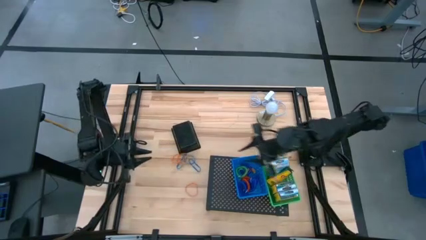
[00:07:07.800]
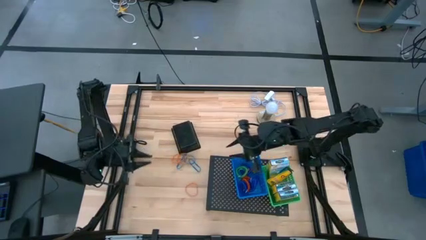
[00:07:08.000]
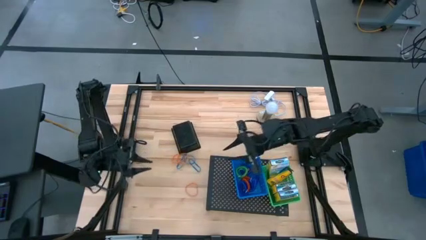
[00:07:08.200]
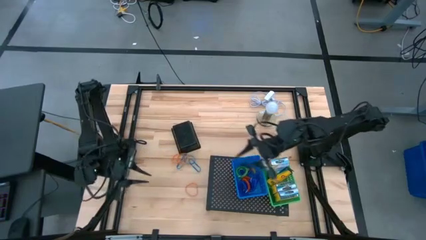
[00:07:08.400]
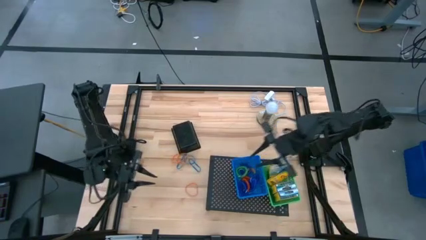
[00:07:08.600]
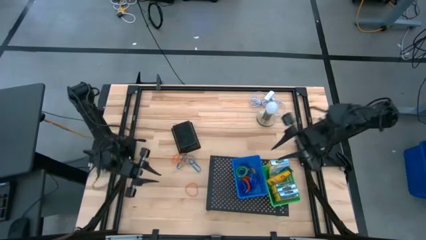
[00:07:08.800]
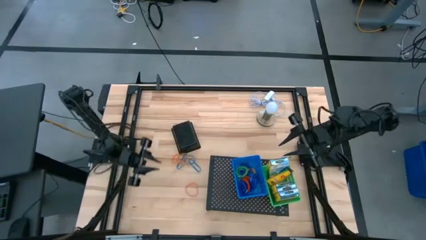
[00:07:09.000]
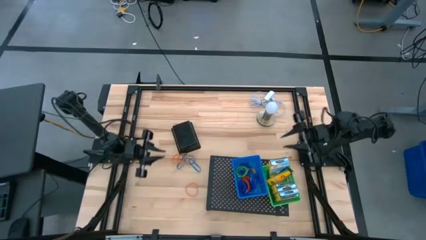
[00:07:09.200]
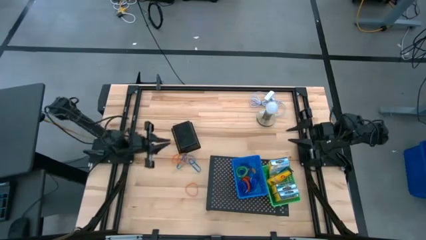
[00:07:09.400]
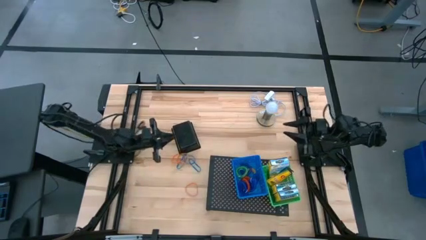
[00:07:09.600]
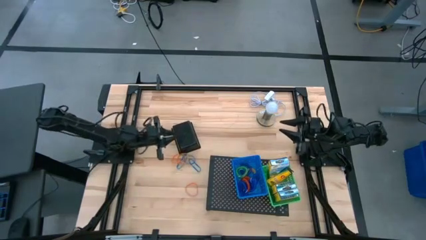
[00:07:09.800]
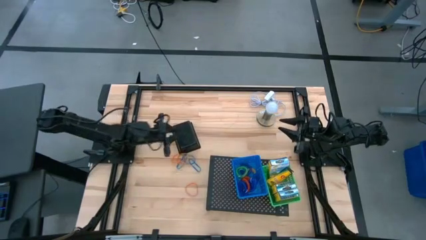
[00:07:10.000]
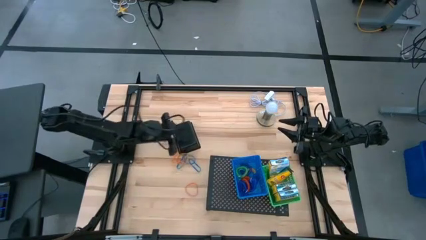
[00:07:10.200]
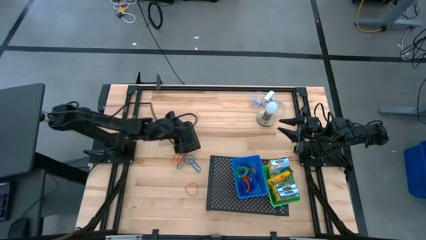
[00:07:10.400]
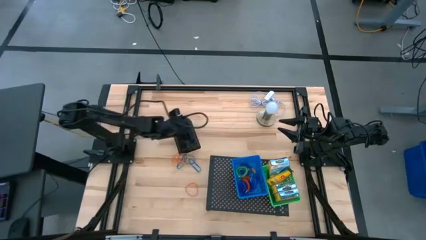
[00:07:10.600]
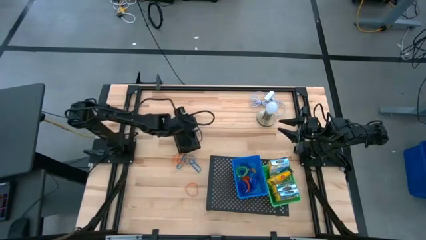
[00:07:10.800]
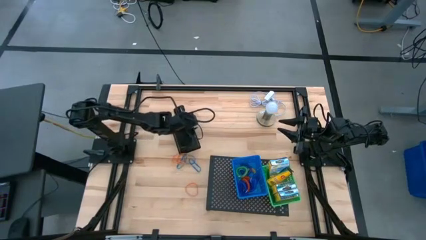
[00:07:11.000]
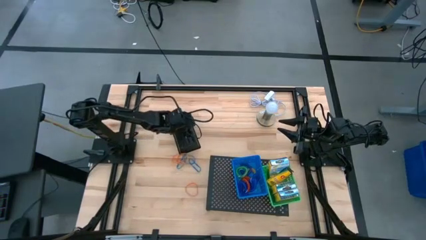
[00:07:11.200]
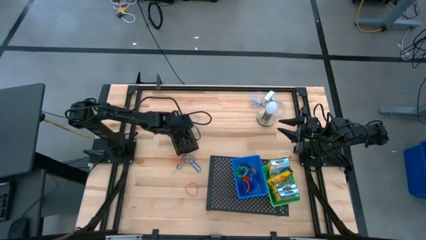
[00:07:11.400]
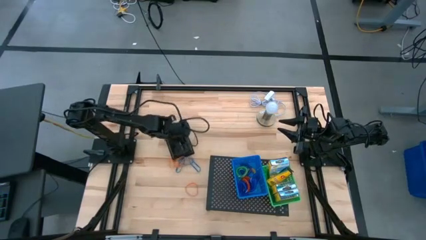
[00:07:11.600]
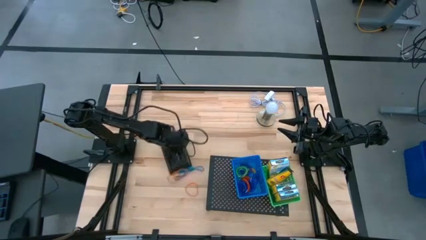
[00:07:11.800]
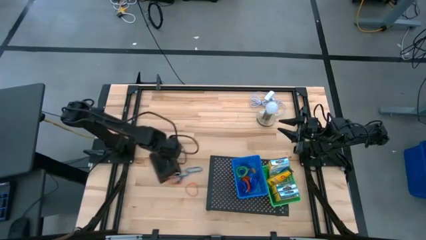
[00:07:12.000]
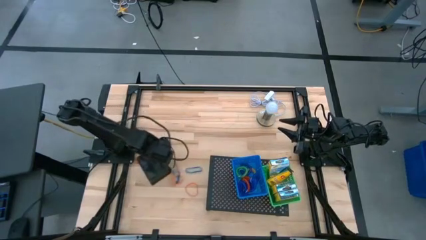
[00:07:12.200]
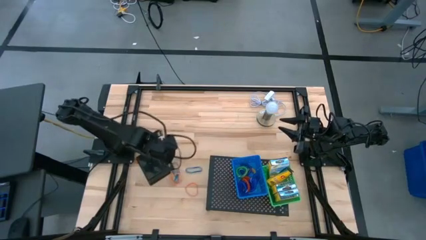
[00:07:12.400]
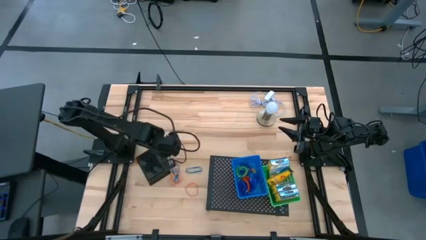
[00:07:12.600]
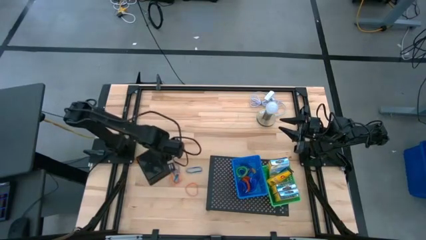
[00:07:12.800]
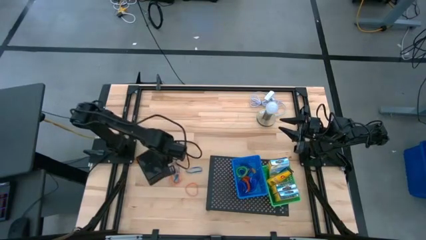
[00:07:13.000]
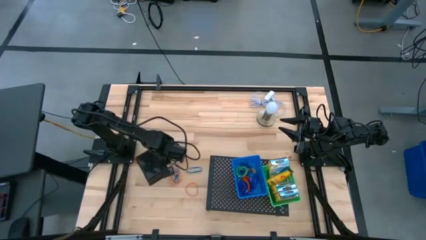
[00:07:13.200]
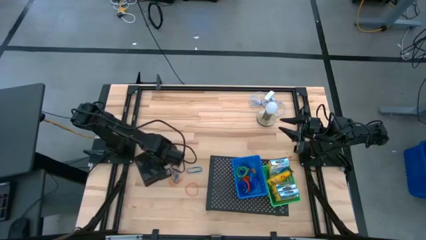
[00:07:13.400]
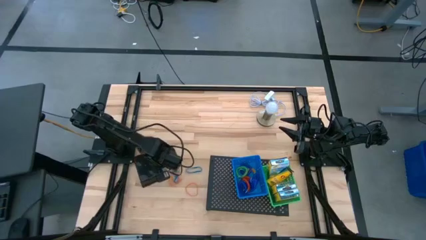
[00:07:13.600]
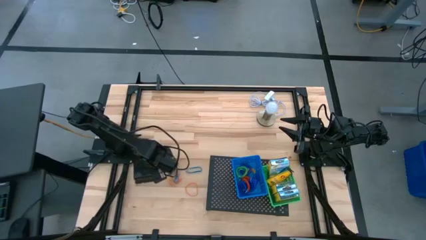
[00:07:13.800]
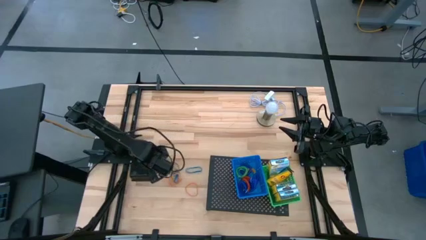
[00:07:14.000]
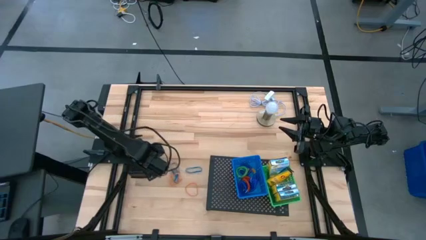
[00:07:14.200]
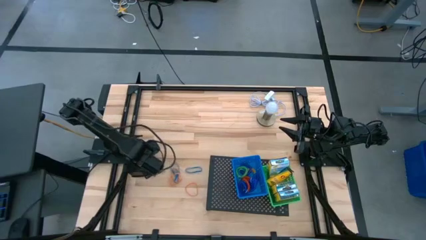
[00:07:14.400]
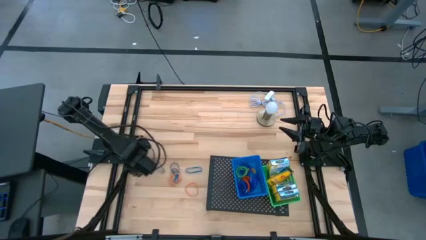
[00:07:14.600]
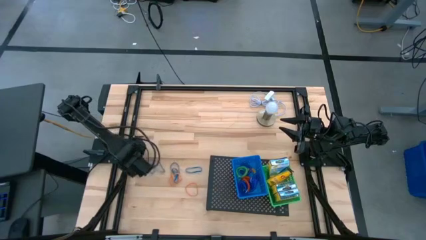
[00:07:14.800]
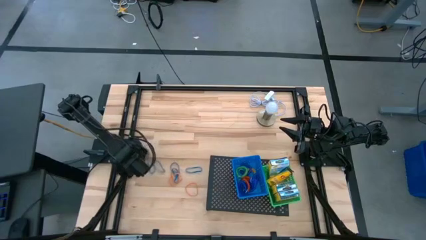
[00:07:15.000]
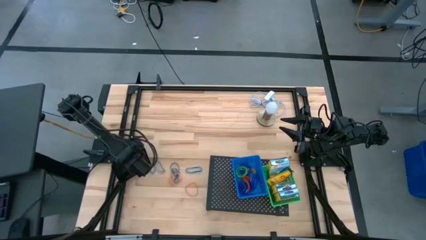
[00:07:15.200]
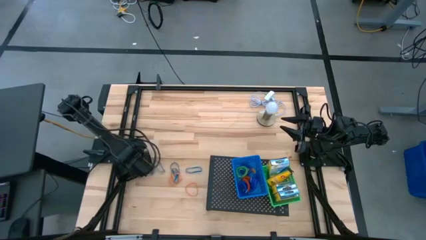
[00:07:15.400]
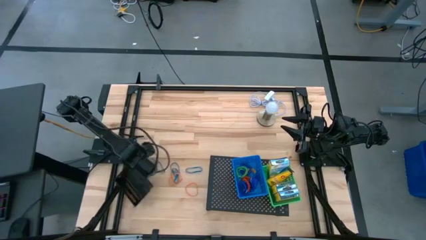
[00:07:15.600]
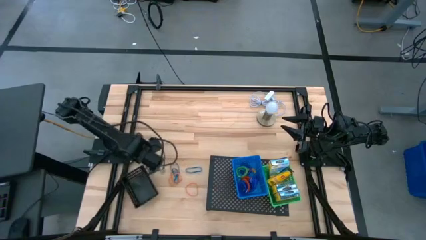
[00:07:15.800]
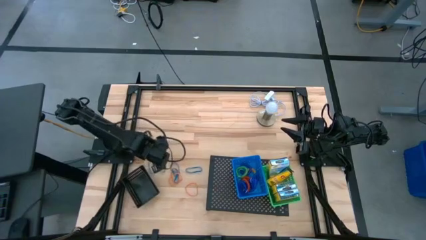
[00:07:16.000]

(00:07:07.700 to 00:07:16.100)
Task: Pick & Place Office Desk Supplies
Put the black bin on the table upright

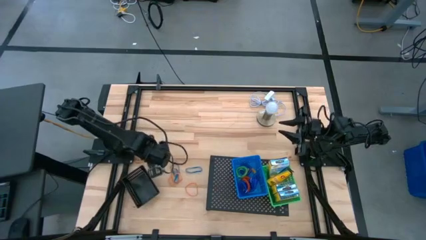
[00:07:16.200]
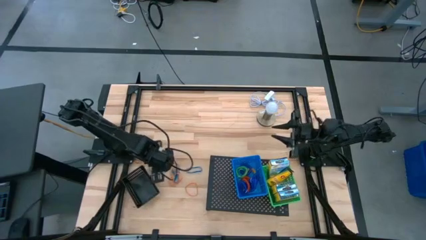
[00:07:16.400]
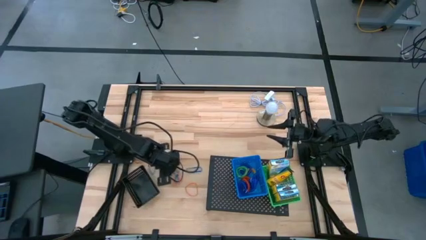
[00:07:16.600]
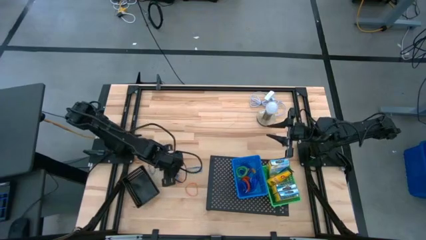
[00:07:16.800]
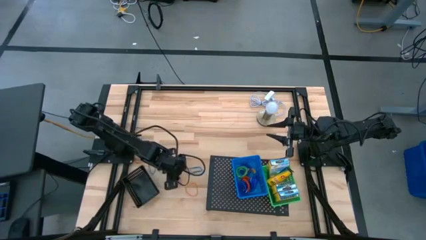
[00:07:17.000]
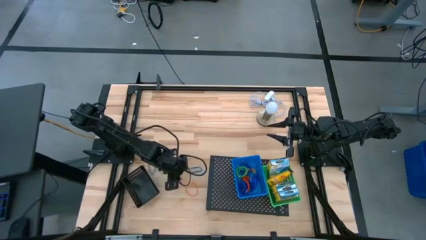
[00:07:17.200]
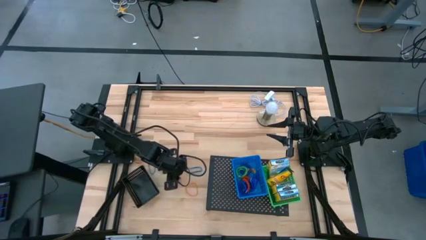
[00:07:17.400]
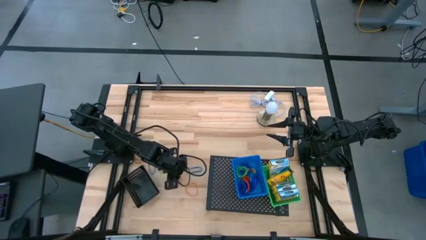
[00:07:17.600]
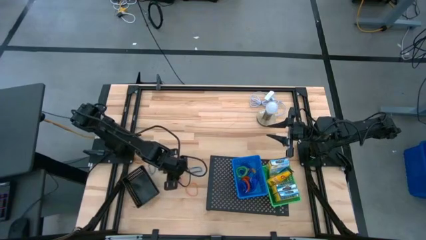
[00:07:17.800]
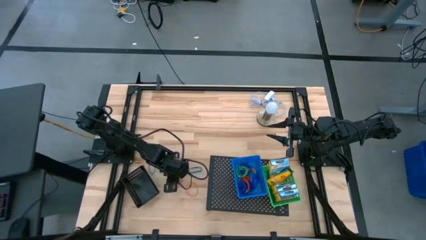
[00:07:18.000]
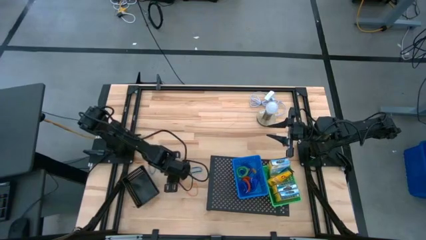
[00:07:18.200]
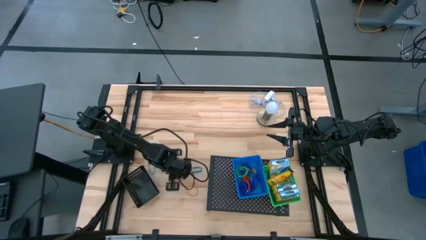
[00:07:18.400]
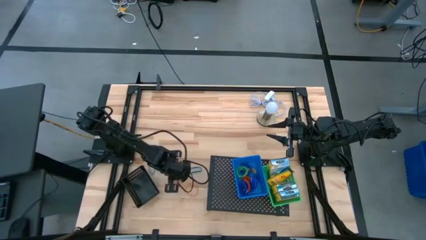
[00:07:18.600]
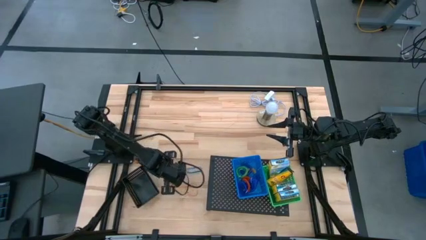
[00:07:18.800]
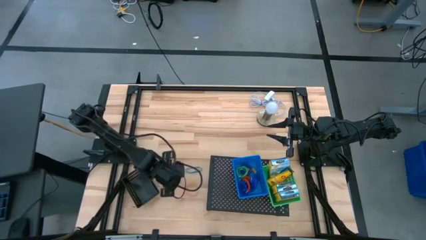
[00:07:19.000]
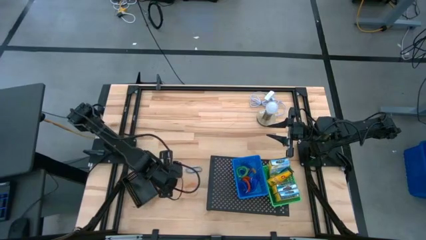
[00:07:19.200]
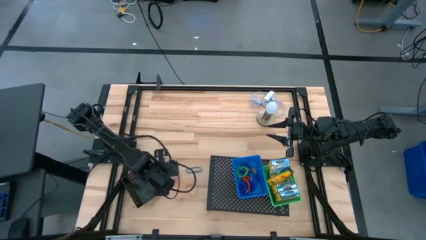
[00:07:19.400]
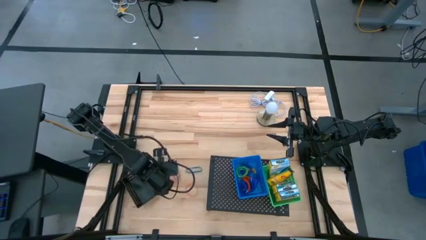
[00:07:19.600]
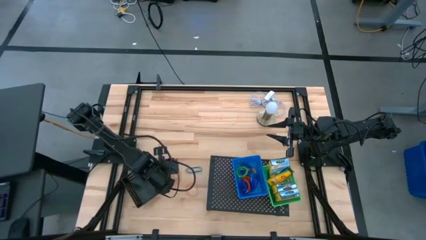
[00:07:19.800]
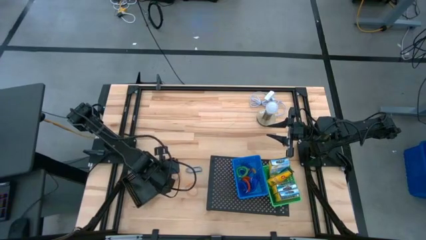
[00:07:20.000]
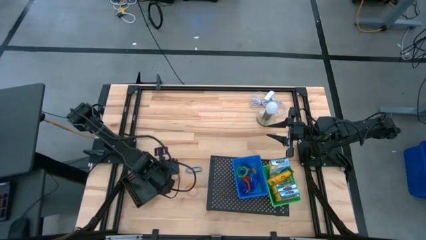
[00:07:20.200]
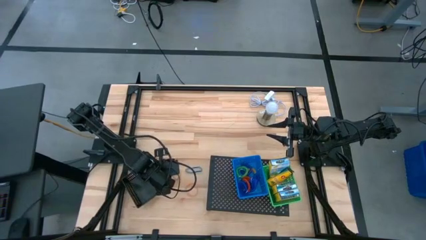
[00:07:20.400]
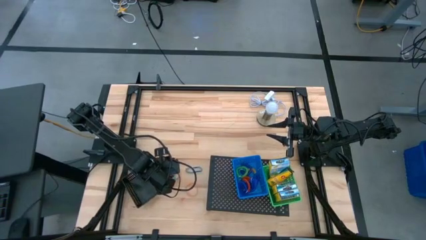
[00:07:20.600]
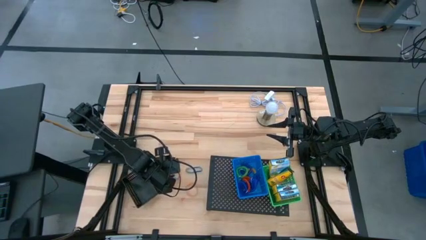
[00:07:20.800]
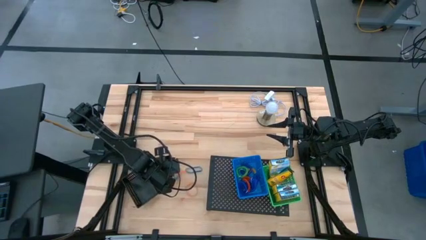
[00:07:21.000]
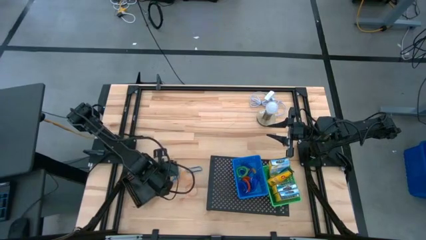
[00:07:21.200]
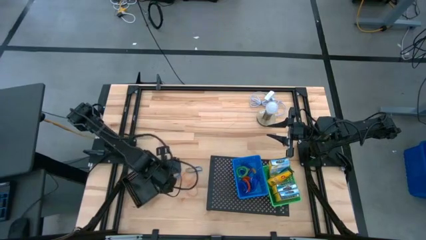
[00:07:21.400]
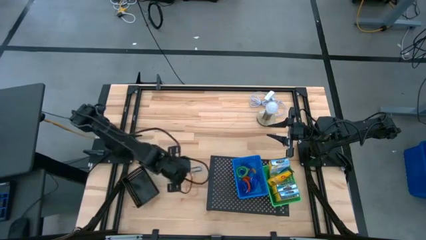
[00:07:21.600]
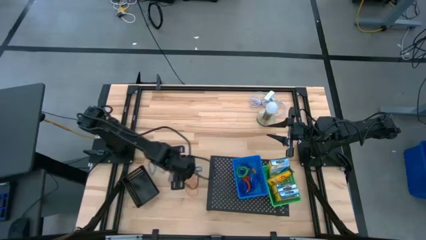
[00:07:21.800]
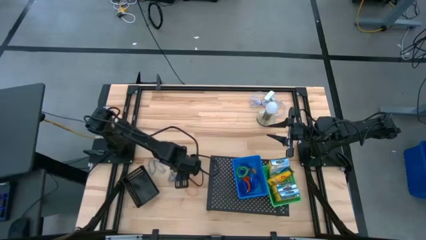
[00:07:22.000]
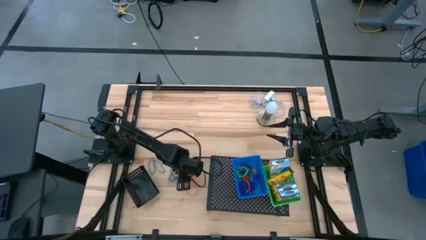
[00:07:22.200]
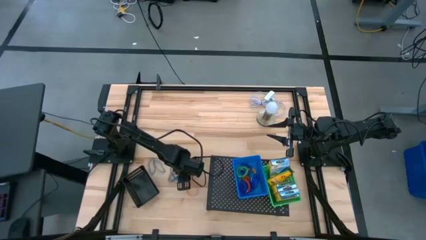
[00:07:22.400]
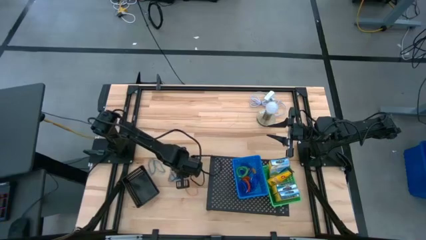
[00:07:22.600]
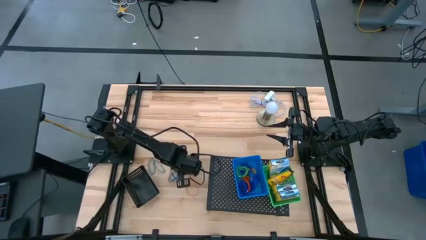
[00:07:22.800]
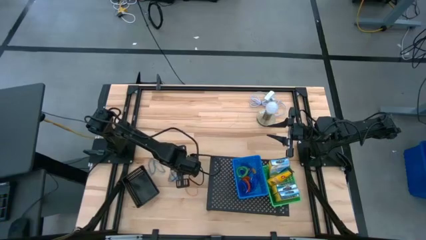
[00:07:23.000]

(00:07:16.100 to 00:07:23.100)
Put the middle orange rubber band into the black bin

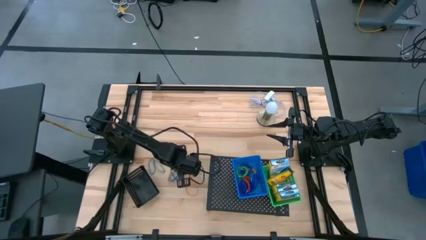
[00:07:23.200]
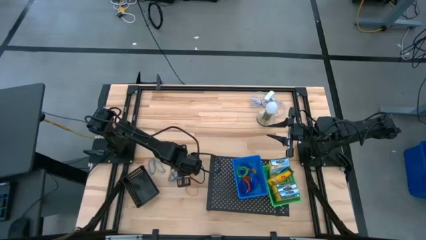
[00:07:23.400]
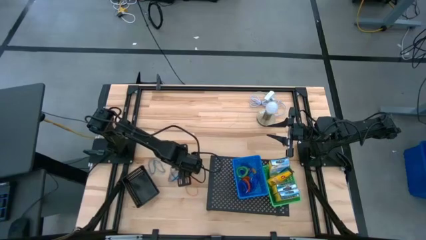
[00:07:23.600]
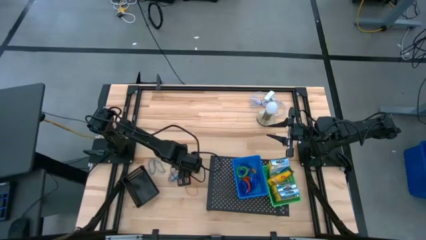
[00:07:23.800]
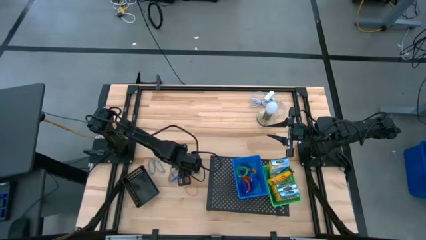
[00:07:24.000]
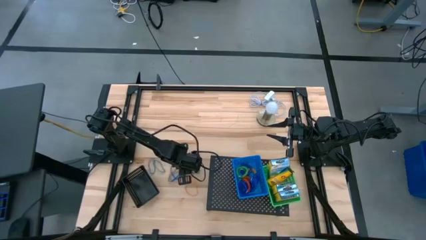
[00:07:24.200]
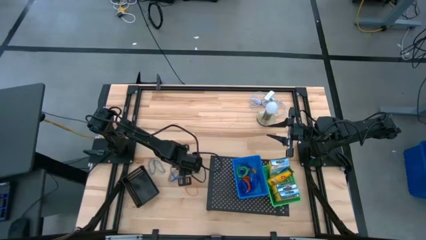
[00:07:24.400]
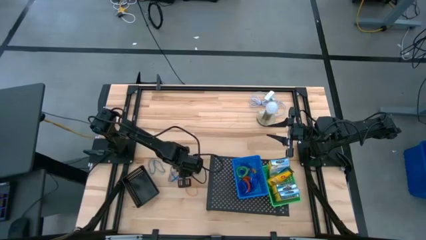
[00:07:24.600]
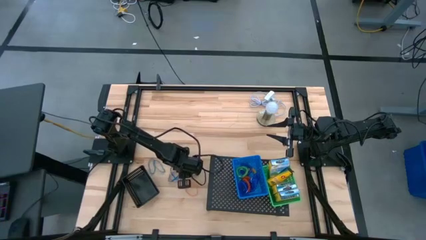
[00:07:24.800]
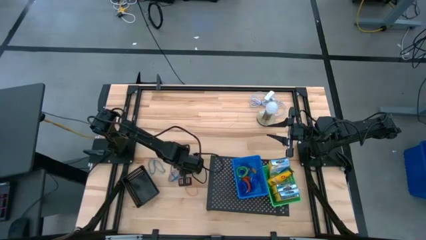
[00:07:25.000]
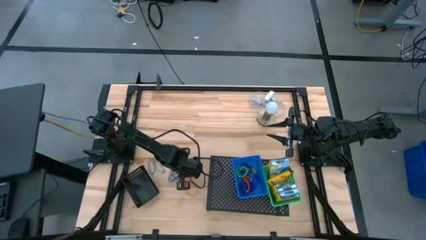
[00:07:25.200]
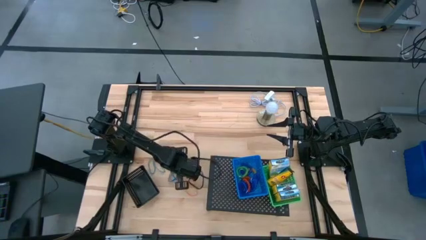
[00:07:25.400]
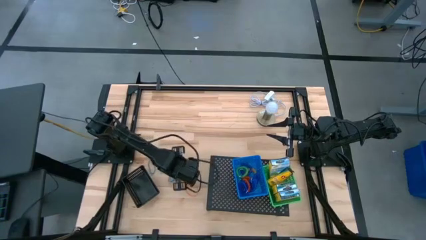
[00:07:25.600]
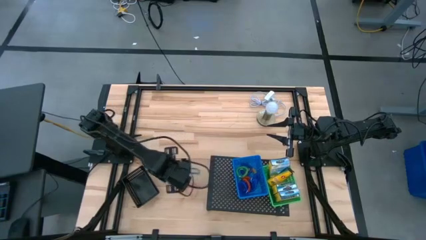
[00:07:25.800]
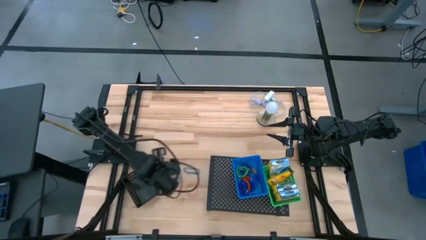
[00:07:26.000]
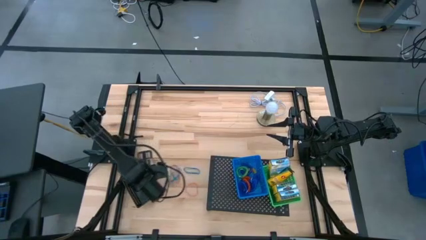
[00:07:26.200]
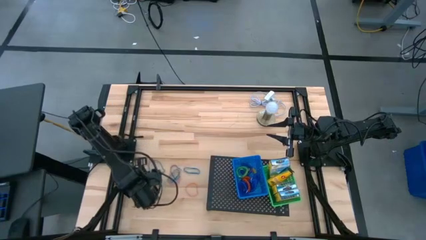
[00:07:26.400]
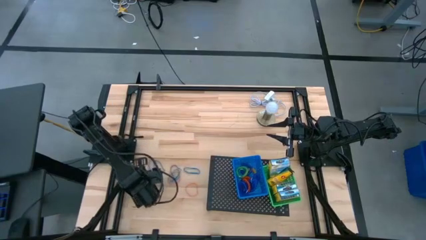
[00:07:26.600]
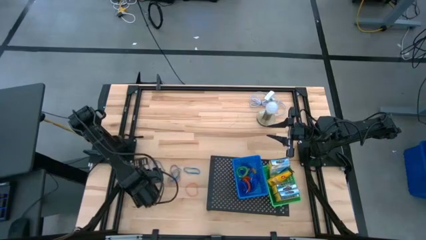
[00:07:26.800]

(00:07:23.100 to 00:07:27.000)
Put the middle orange rubber band into the black bin
